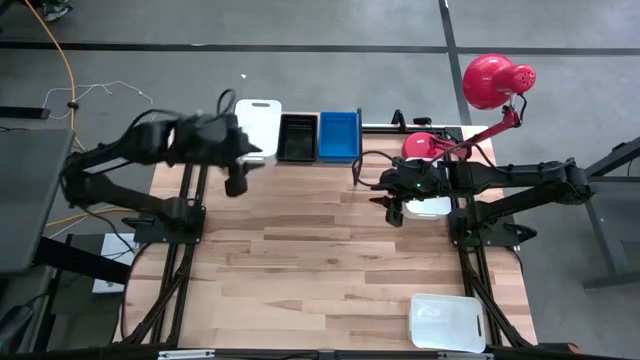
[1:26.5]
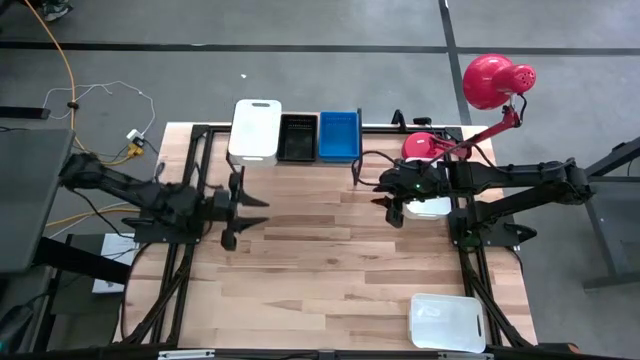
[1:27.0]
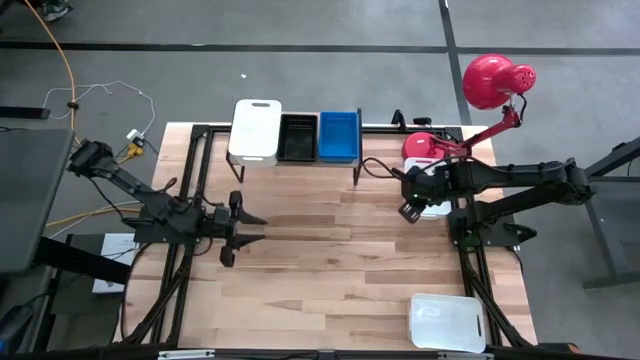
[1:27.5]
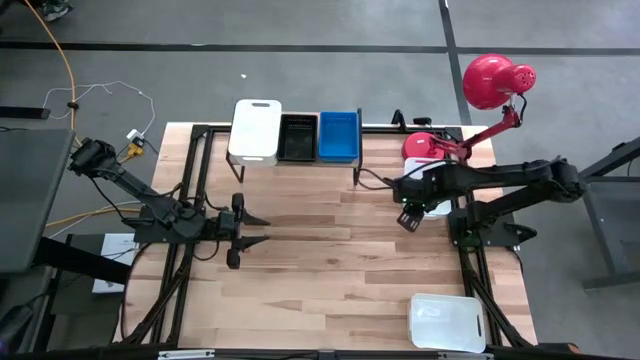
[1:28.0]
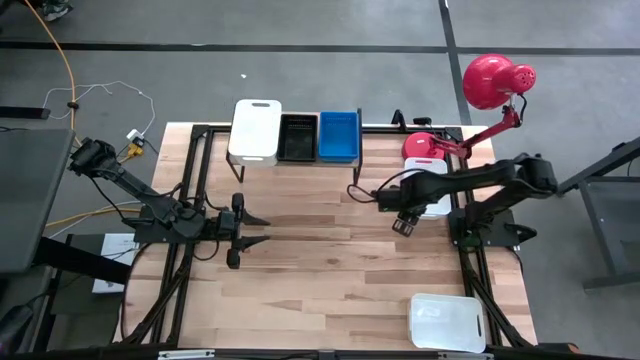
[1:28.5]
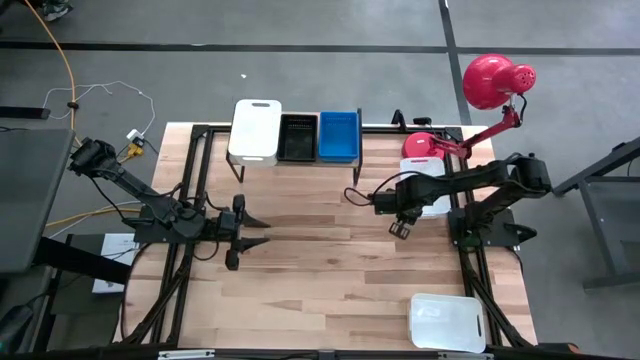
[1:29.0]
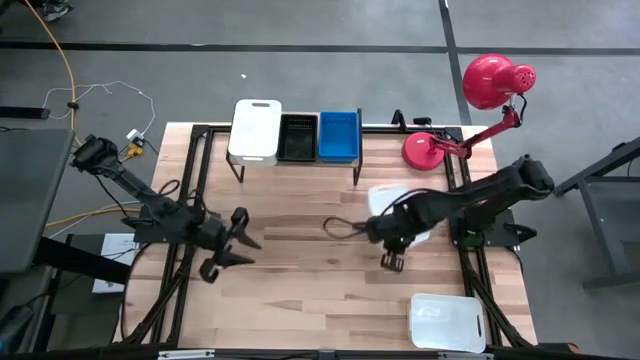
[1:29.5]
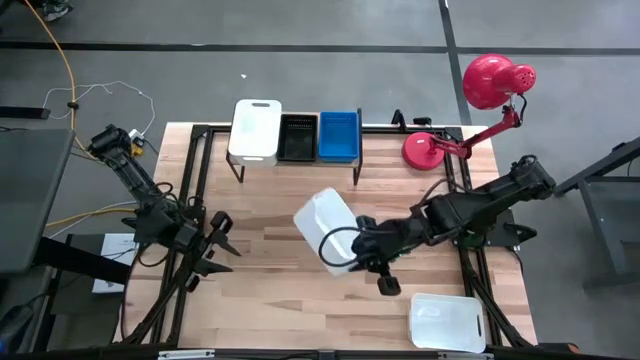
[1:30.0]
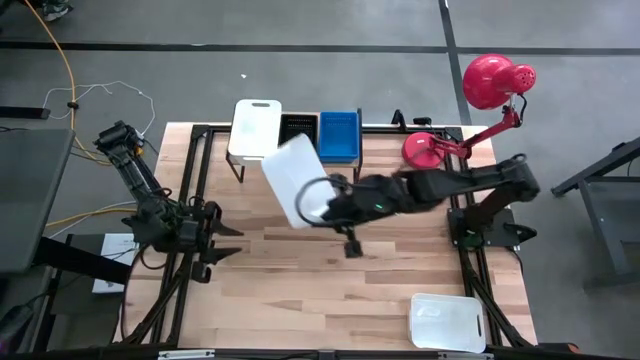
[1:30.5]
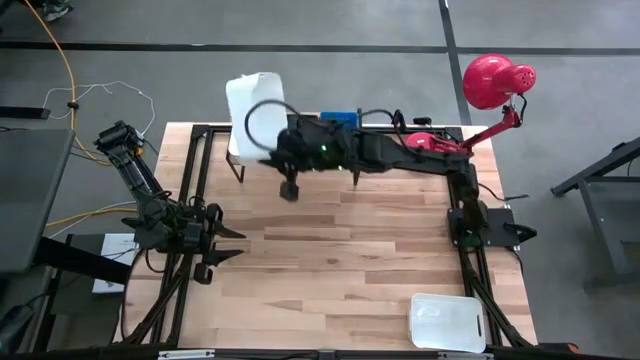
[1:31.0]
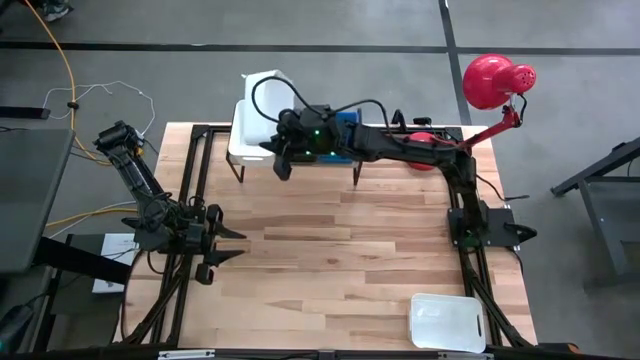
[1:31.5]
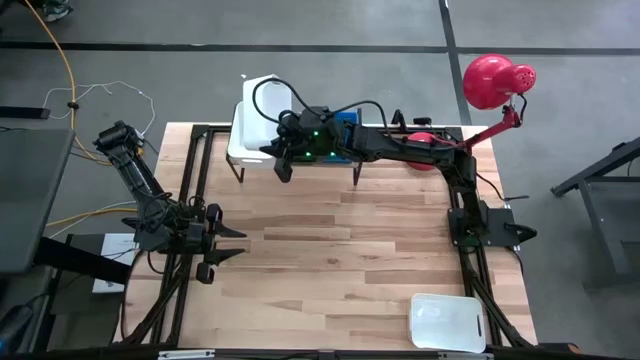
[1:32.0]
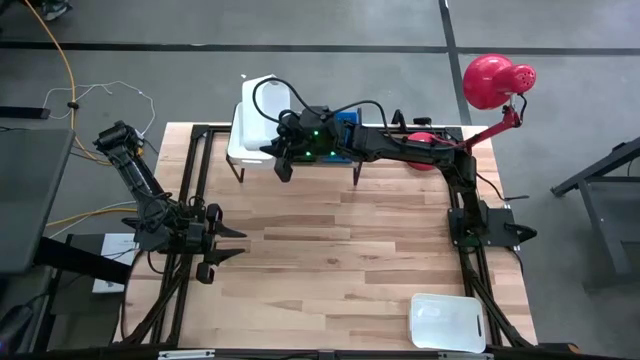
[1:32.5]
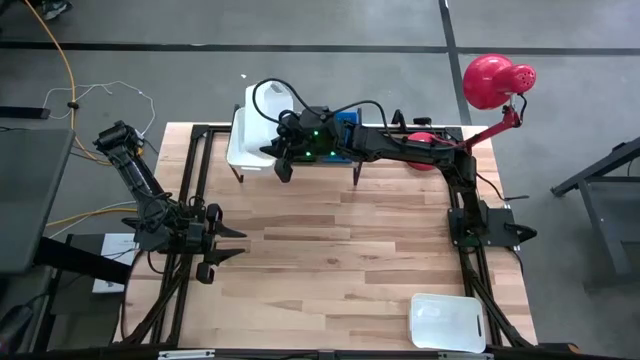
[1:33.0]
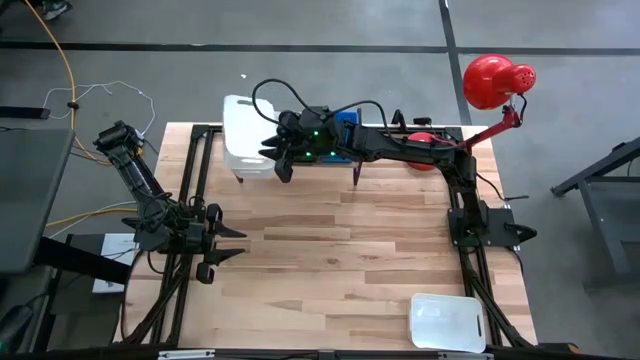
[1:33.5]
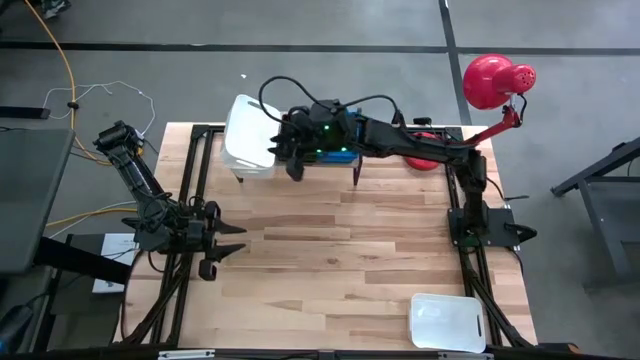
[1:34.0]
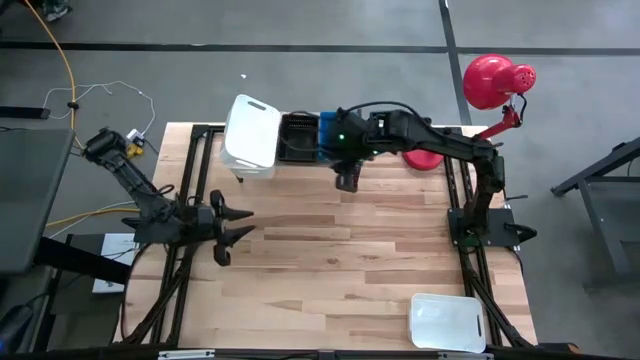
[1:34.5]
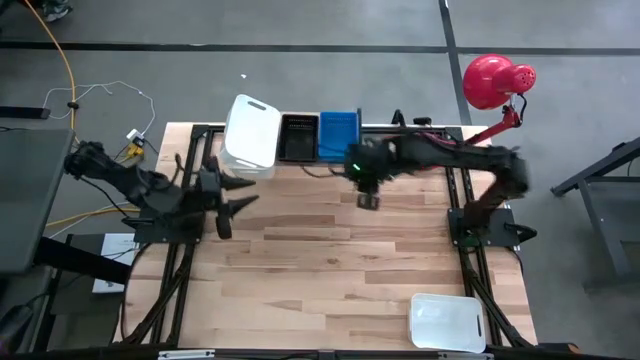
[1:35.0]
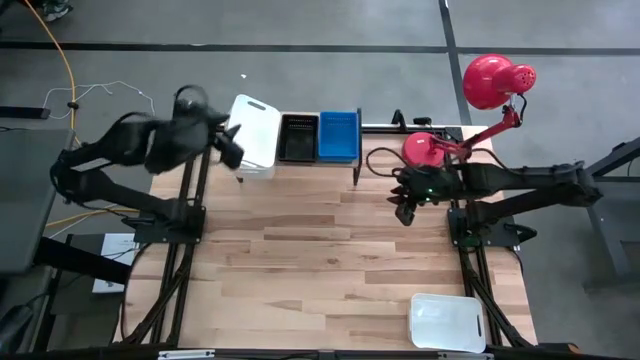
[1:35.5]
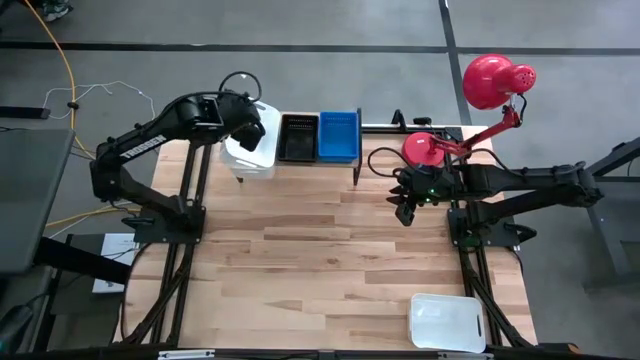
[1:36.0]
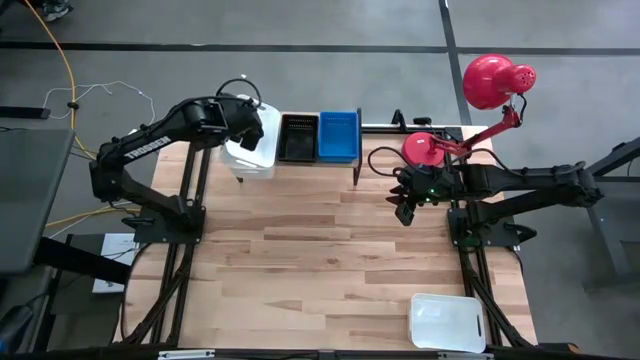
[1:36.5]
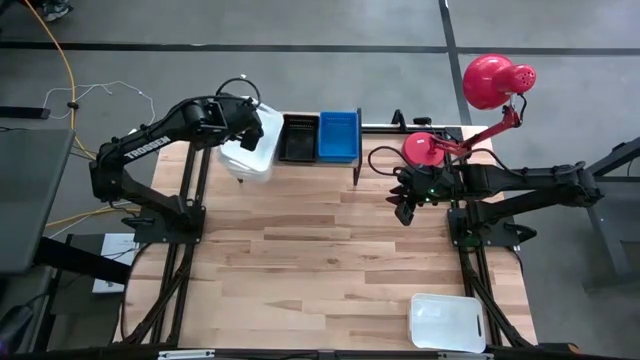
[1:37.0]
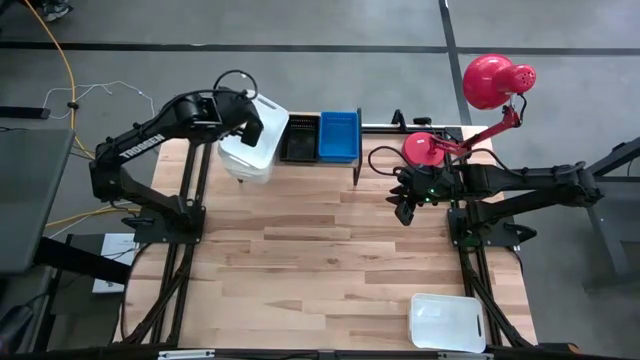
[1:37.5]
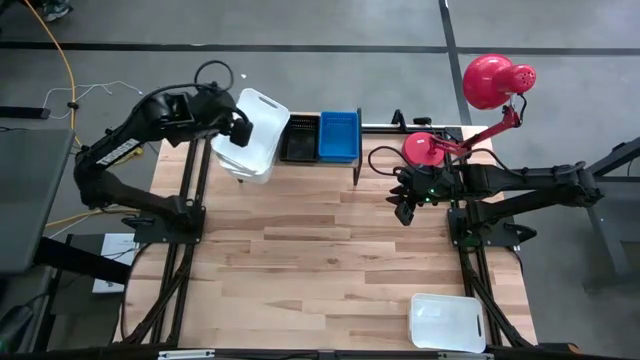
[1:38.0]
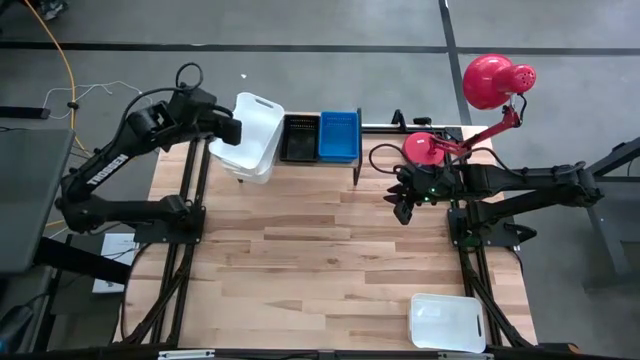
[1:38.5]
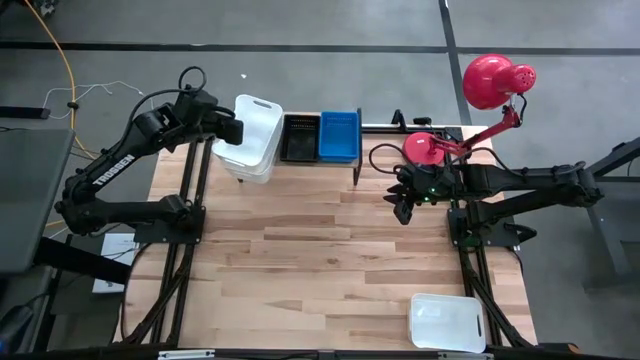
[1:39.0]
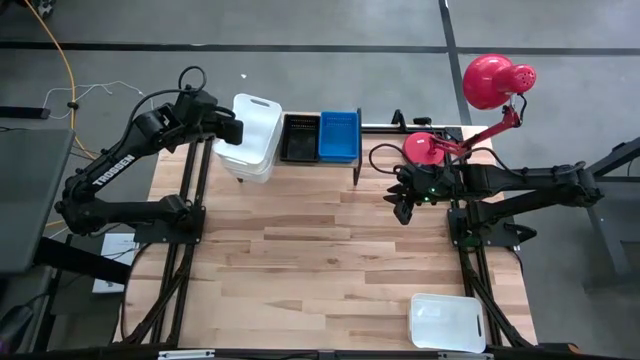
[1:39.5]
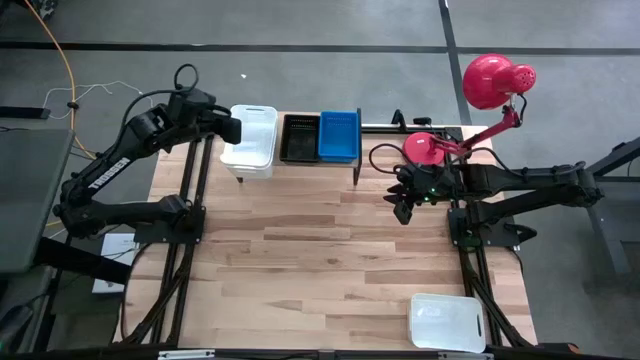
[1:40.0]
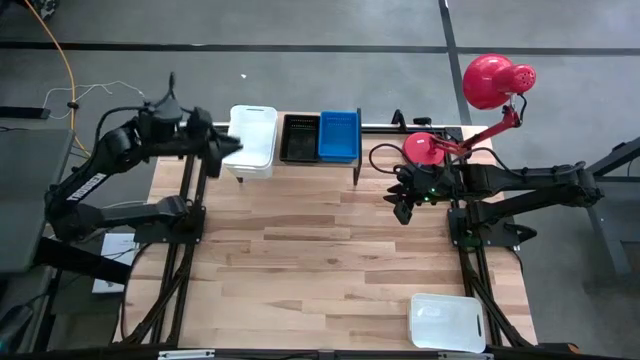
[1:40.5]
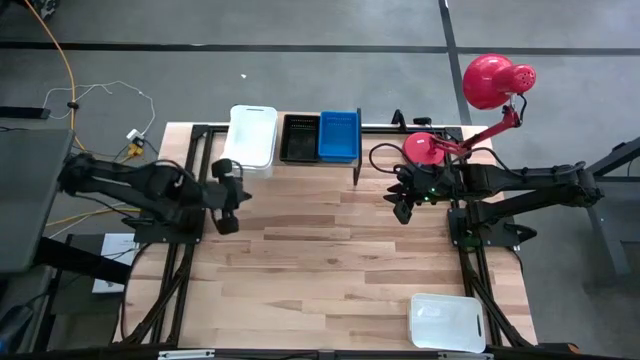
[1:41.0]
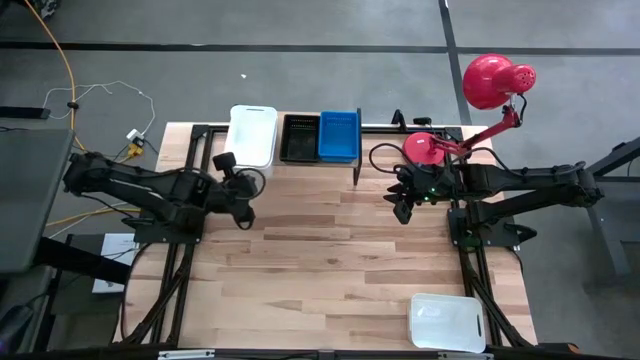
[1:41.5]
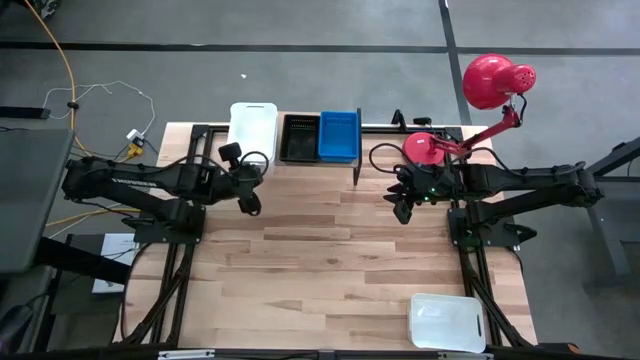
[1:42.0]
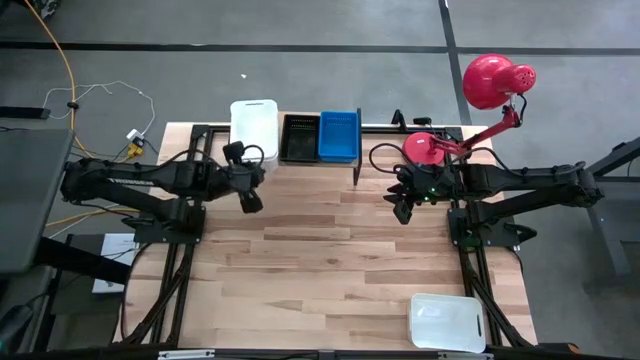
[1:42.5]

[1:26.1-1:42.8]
Task: Stack baskets on shelf by color
Stack the top white bin on the white bin on the shelf

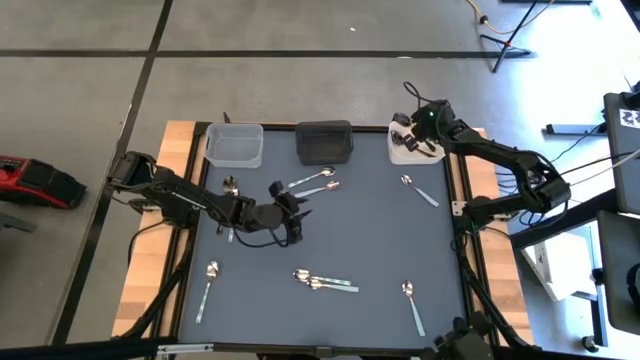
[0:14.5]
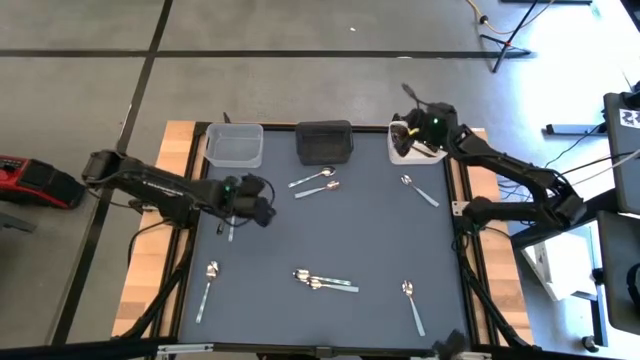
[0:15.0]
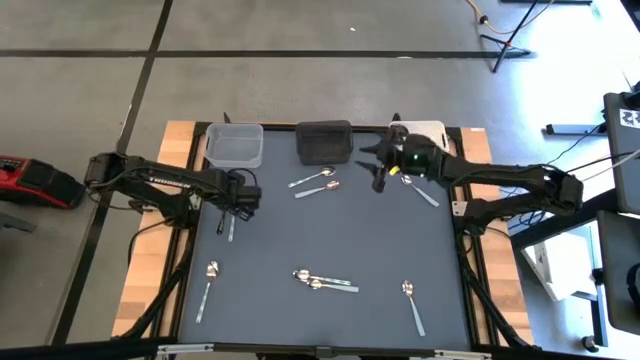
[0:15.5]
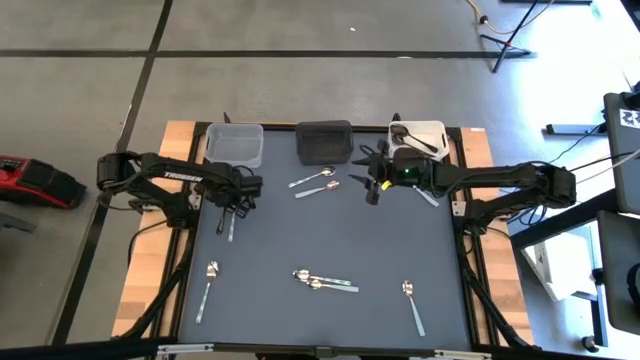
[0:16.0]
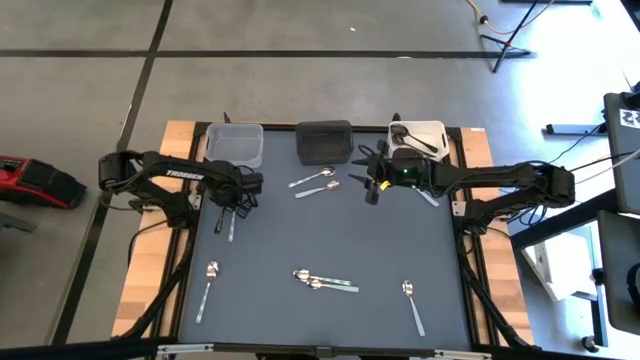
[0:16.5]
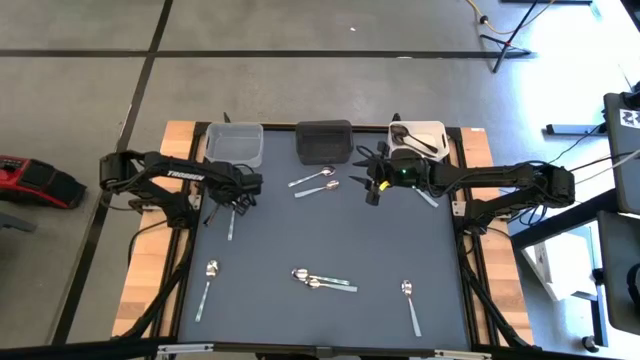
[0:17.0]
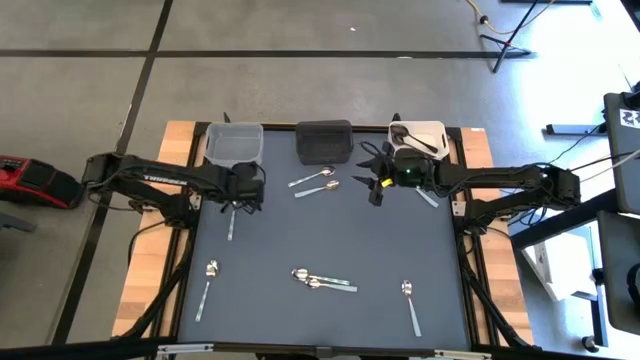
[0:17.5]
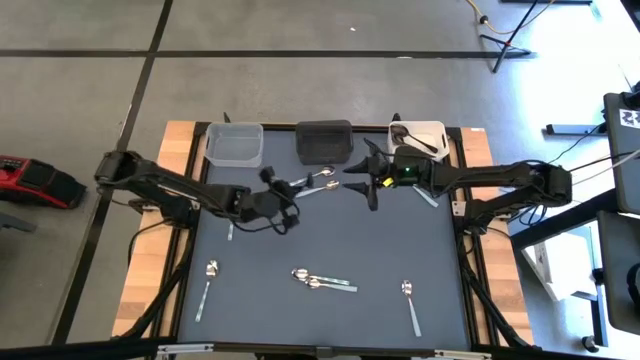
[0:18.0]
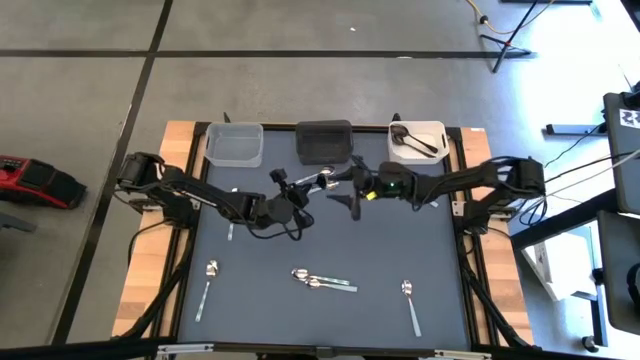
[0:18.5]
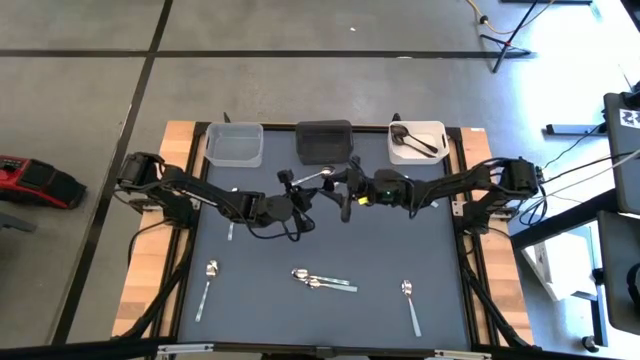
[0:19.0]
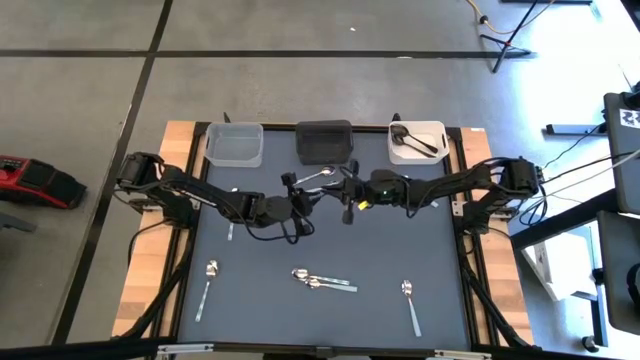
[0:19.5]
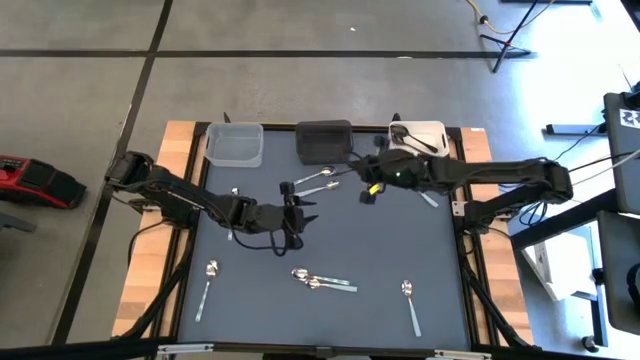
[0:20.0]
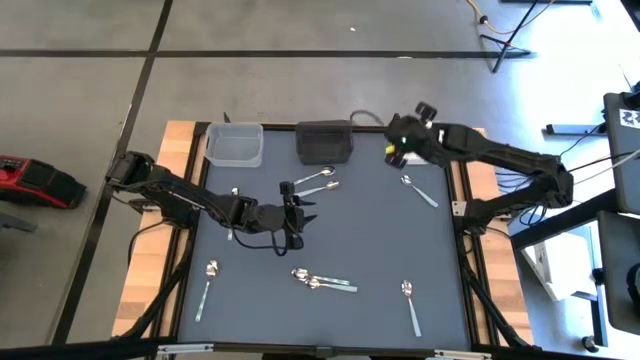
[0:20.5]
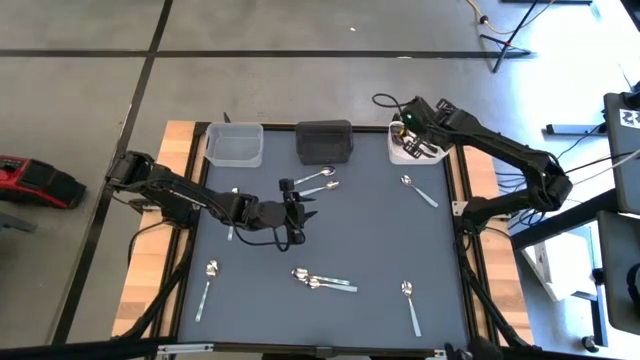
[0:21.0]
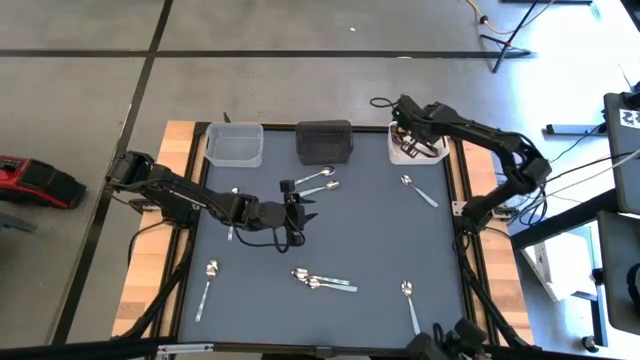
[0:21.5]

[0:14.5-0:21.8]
Task: Sort silverware by color (type)
Put the black spoon into the white bin
